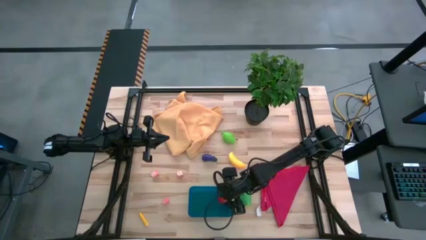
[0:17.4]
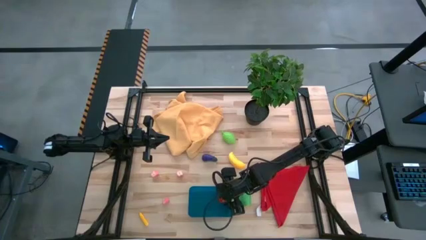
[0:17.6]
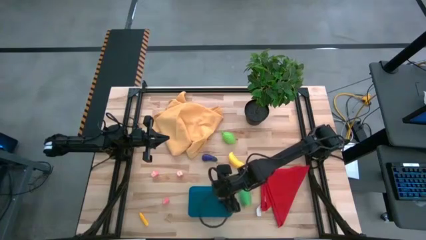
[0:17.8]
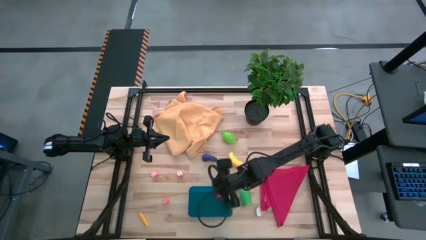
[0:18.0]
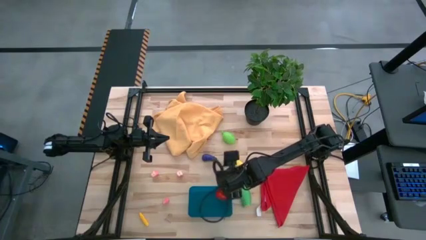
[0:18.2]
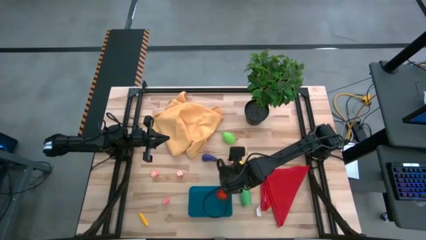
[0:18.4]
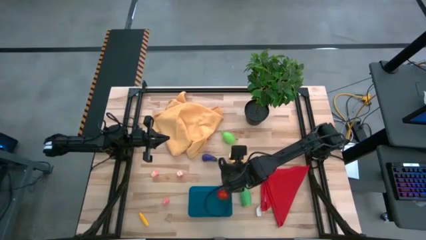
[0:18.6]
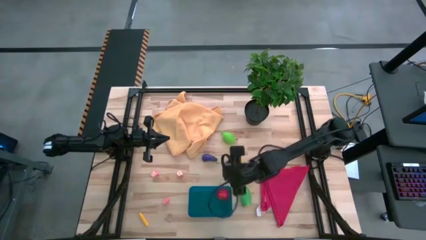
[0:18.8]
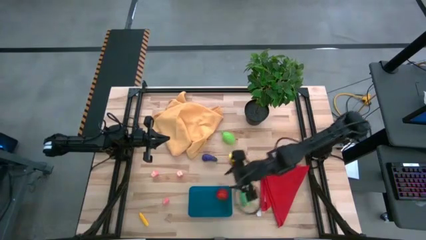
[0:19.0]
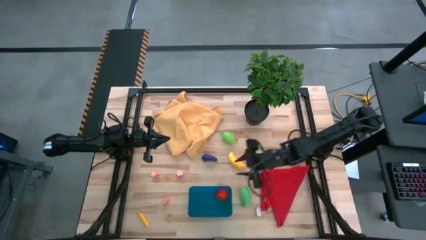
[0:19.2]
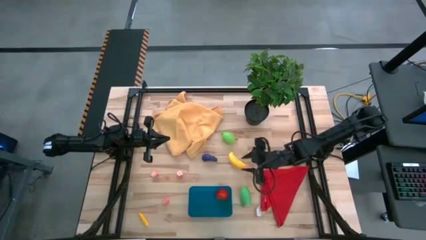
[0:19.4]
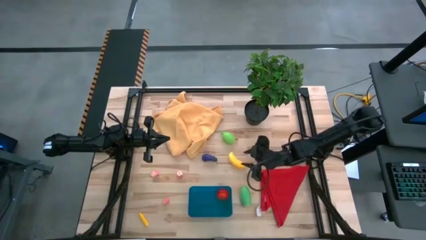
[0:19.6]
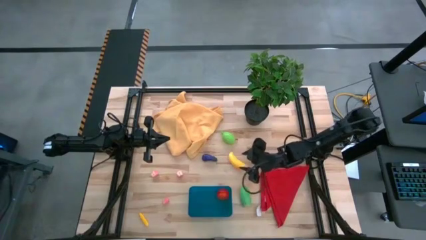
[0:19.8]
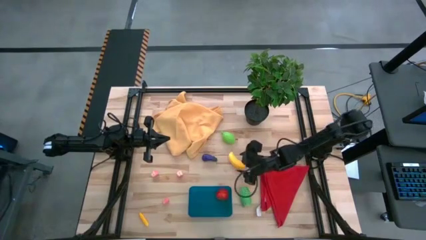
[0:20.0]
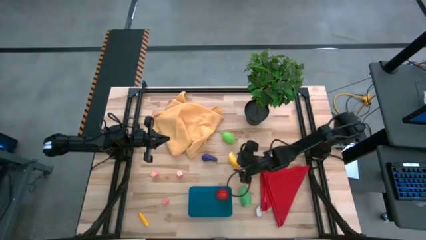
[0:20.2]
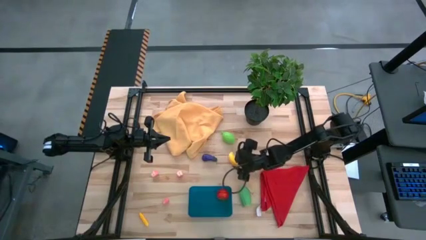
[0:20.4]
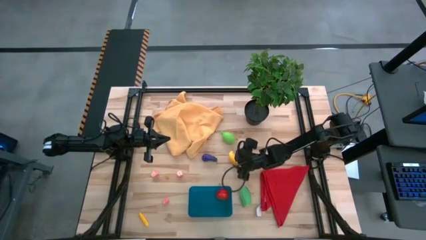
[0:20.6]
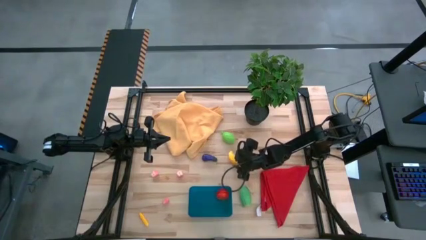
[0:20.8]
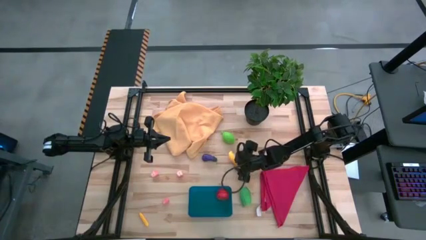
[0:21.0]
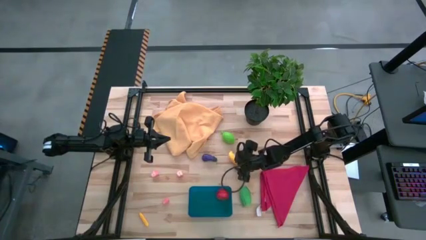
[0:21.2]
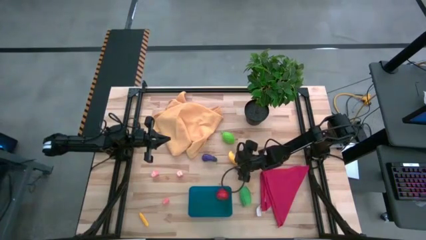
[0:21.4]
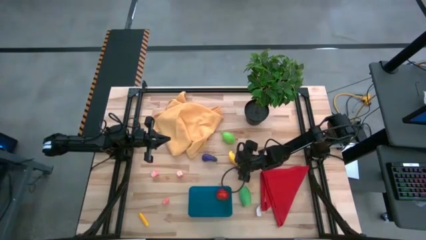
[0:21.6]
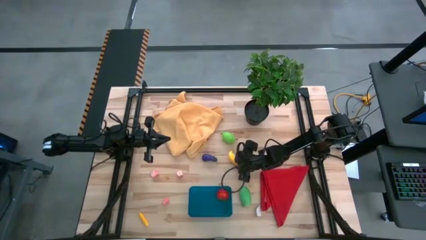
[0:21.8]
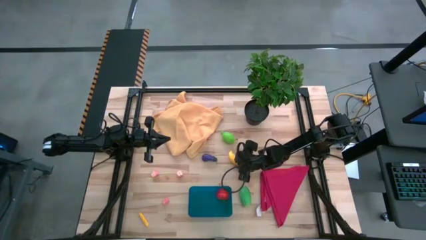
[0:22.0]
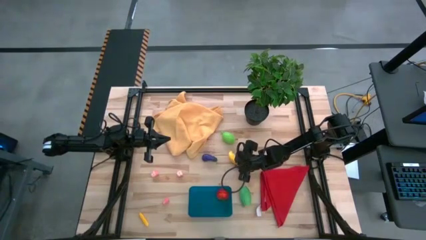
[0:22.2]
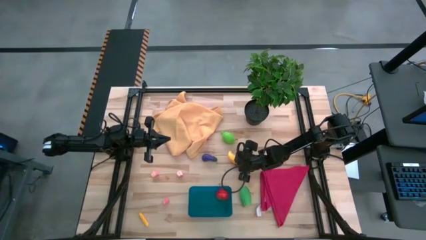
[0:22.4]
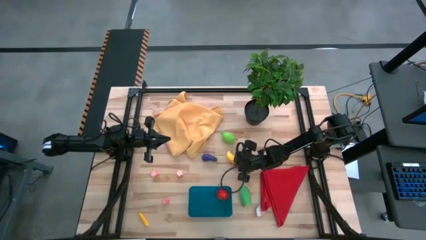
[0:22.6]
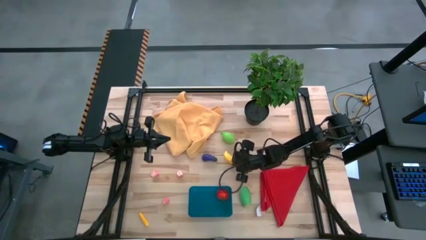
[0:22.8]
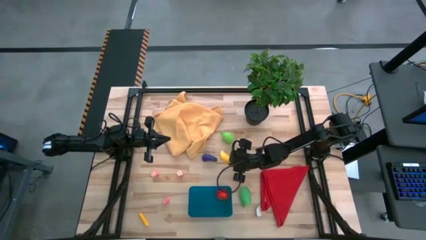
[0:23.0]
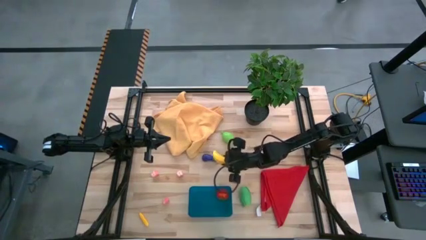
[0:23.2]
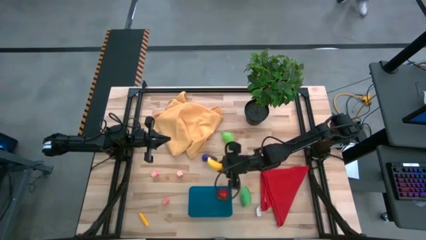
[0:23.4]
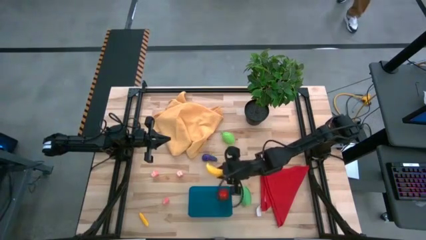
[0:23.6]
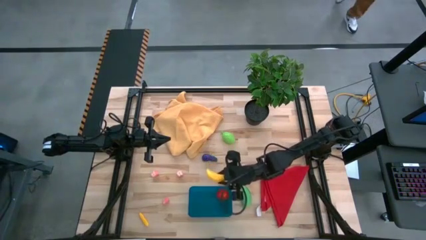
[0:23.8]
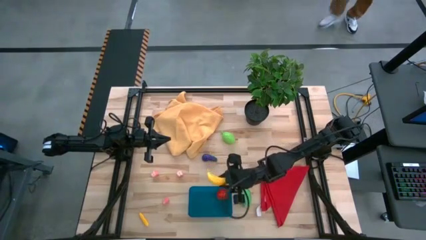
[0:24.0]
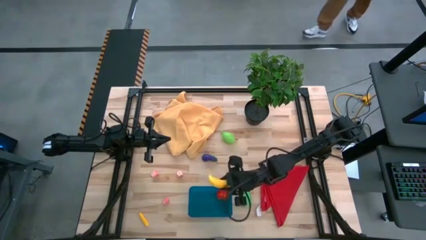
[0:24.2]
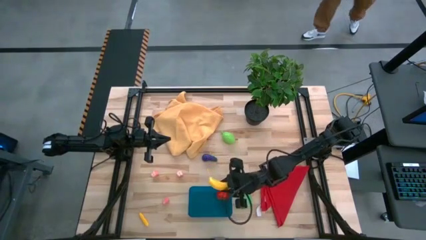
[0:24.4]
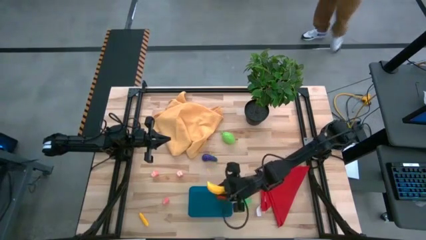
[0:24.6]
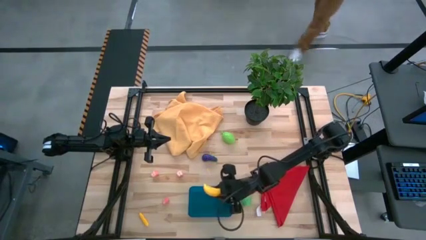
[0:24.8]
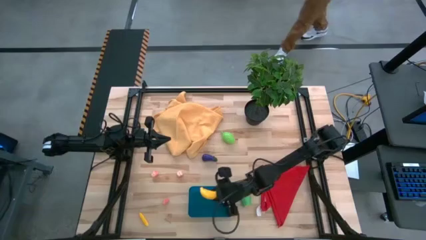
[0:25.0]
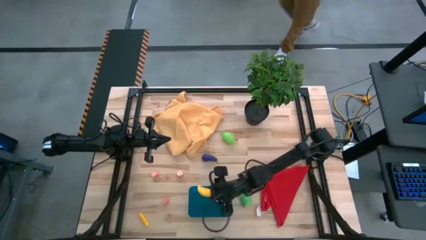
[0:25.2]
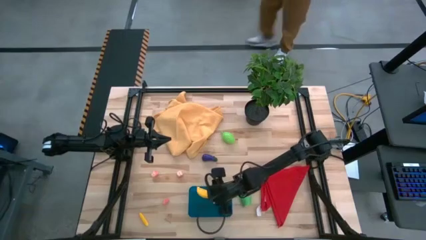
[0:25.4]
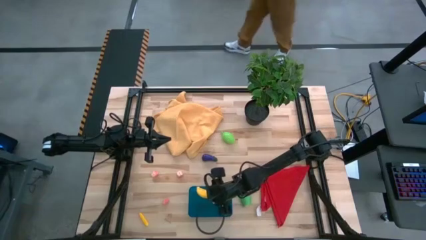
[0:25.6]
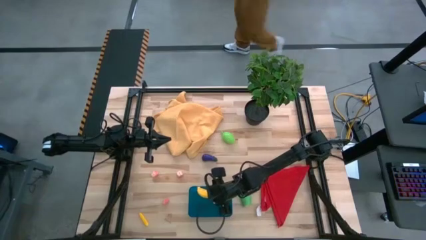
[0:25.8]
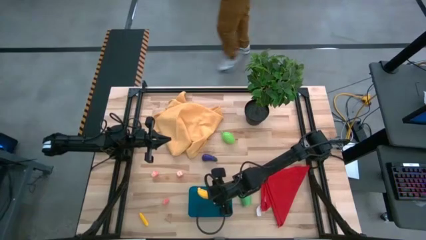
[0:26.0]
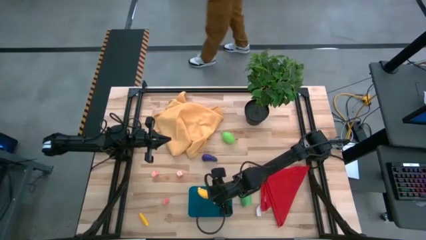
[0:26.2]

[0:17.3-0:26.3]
Task: Pick and placing Produce into tupperware
Put the yellow banana into the blue bin

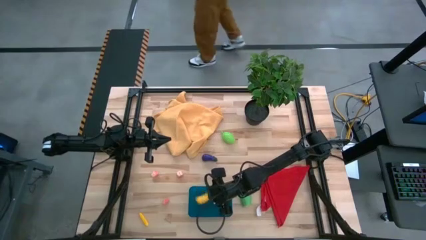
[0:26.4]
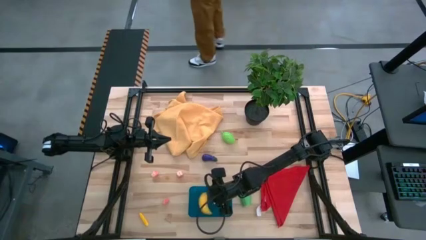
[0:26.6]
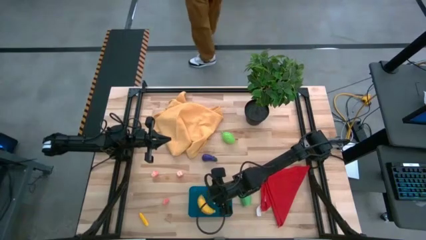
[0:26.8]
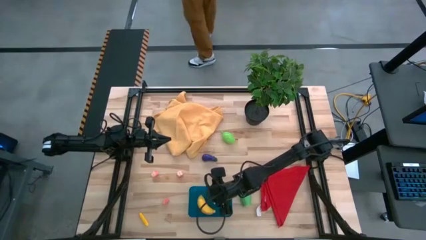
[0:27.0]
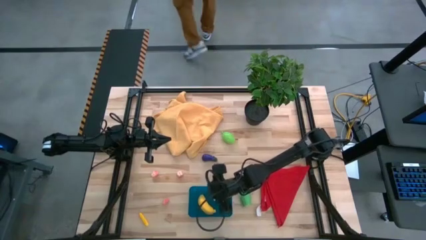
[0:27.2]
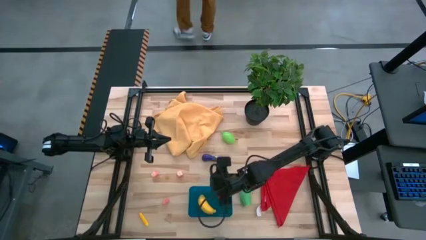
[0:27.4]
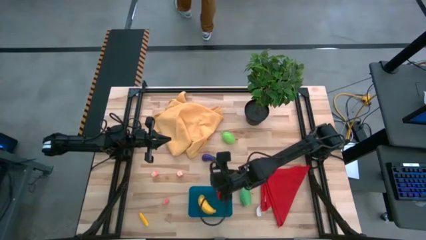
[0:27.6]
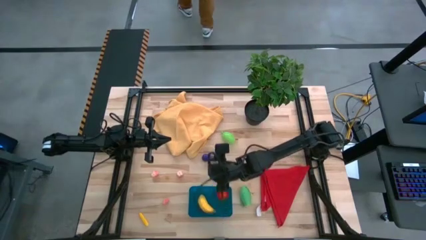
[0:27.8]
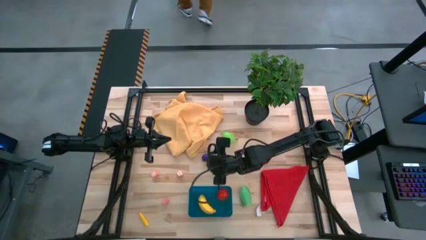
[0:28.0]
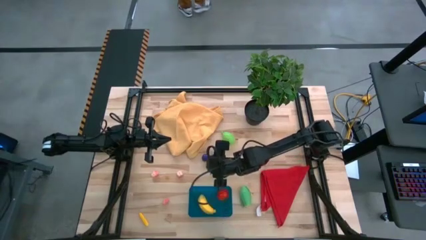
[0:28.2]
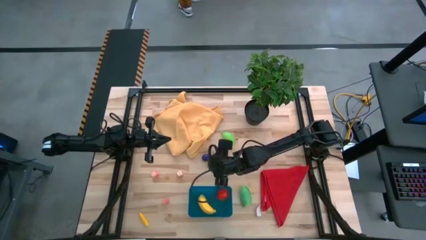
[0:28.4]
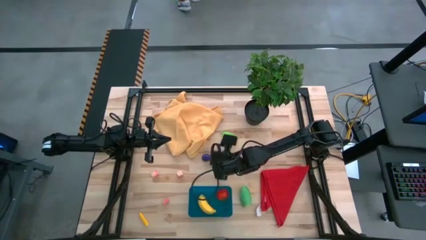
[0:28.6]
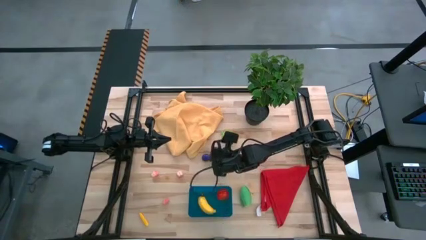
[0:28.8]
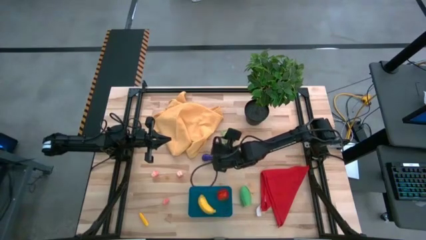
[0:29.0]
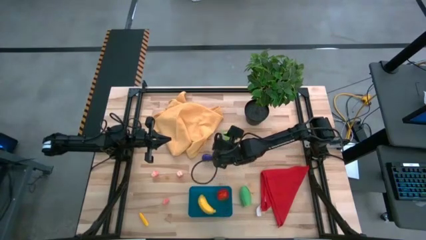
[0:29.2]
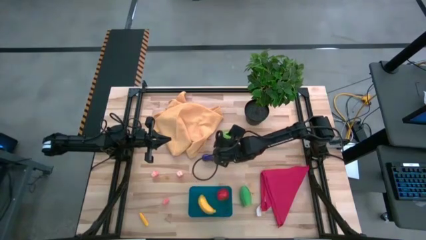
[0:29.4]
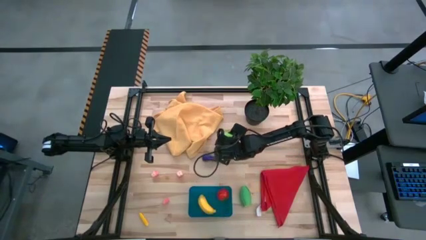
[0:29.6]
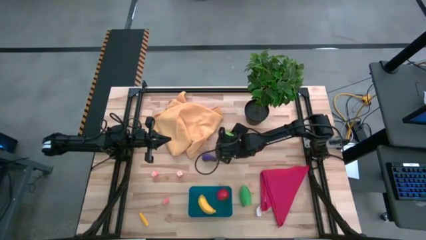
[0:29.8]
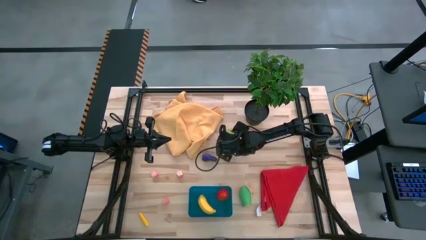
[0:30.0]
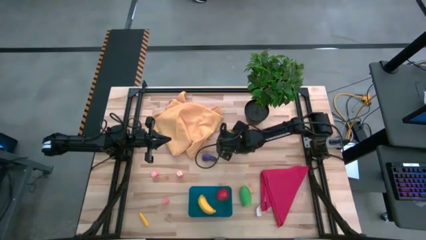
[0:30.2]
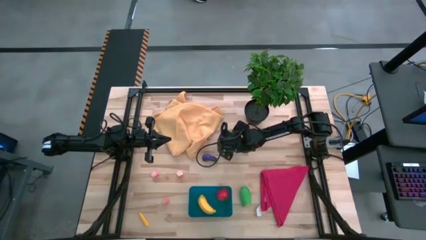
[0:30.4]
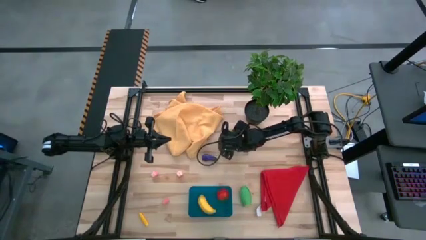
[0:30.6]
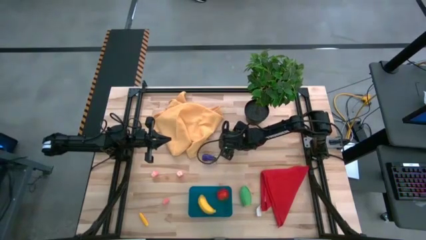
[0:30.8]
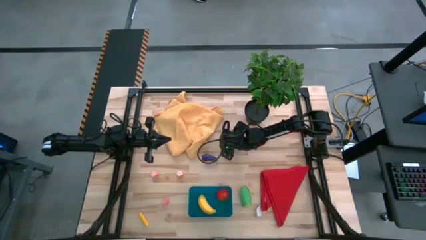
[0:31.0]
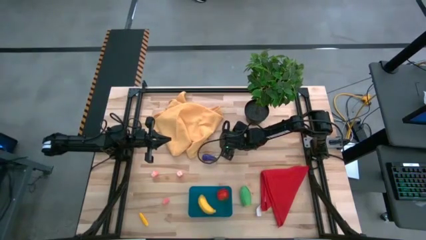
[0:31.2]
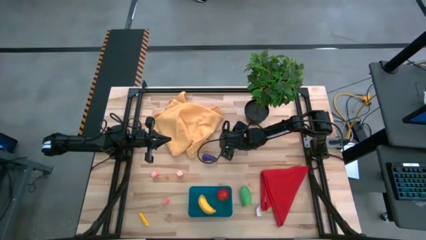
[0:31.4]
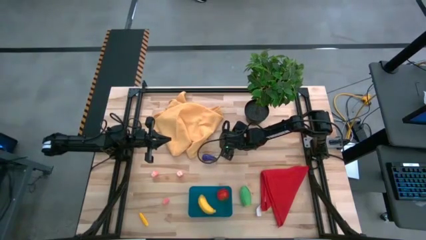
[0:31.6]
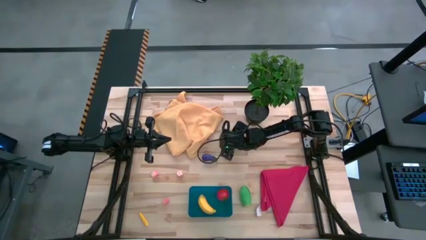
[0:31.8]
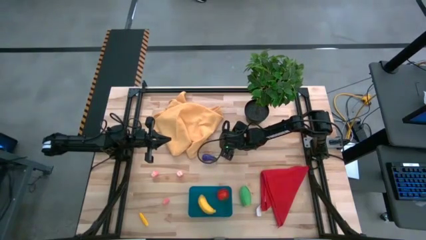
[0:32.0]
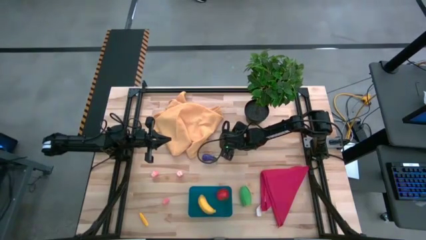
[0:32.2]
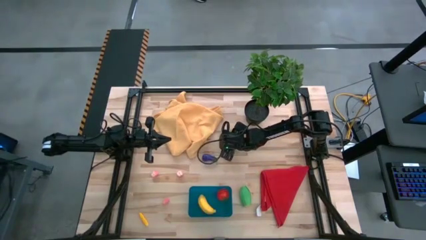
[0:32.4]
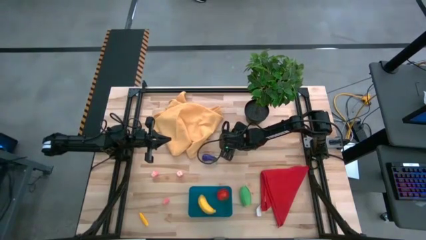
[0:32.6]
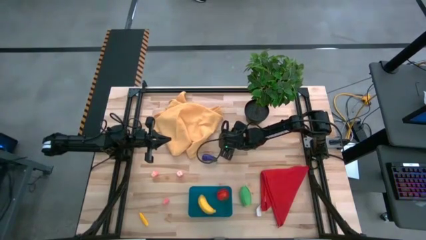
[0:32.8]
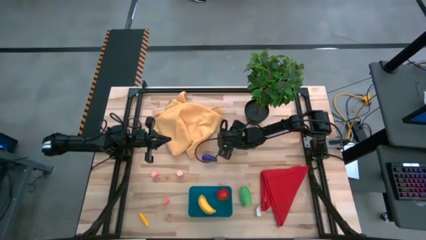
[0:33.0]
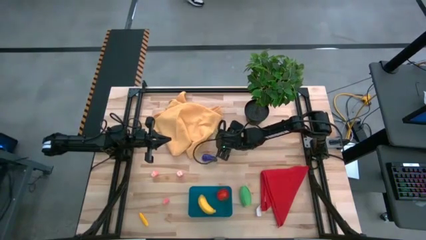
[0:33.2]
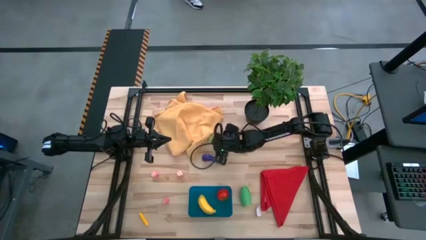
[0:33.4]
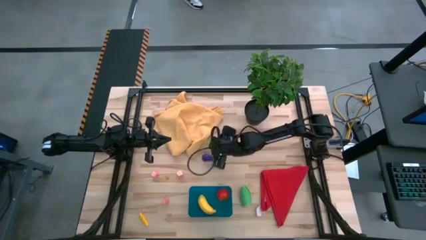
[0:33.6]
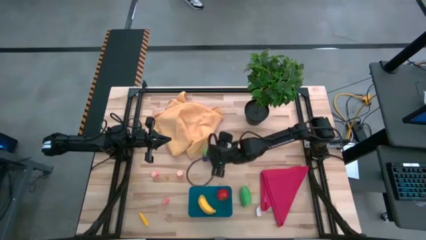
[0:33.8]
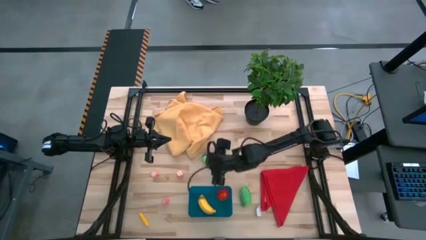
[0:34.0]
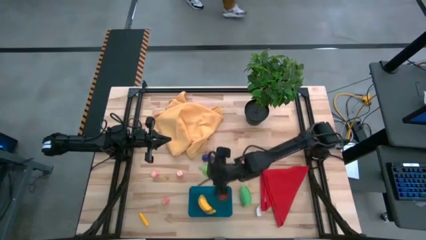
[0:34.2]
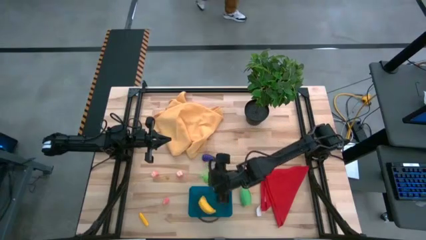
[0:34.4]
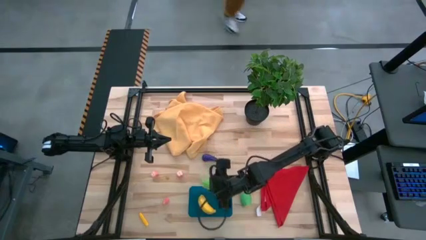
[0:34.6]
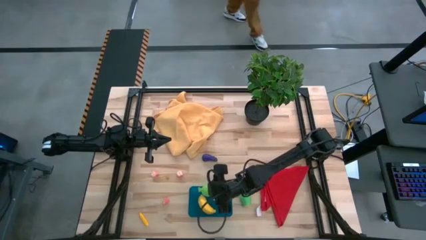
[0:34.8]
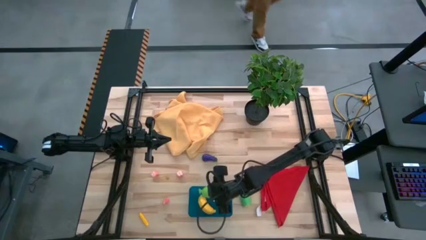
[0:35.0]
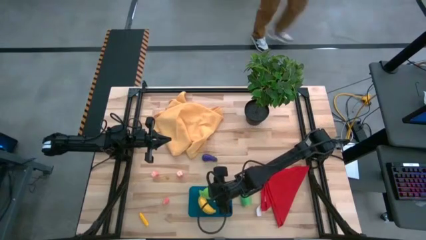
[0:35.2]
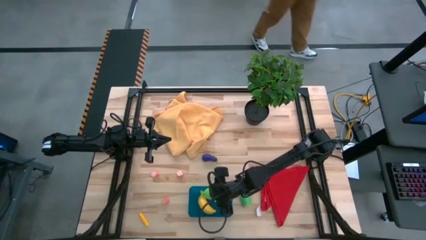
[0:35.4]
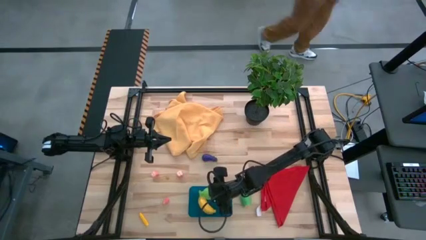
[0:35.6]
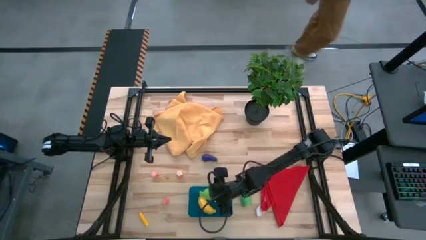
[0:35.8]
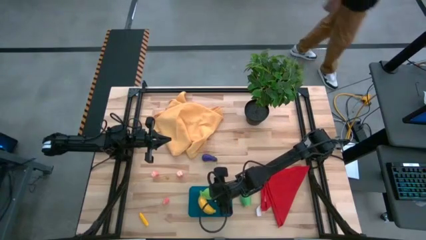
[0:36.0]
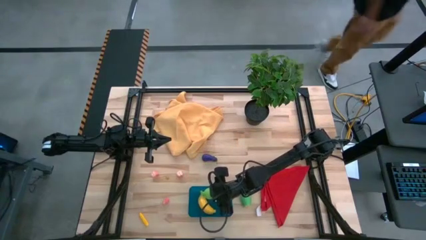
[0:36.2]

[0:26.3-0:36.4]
Put the green melon into the blue bin
